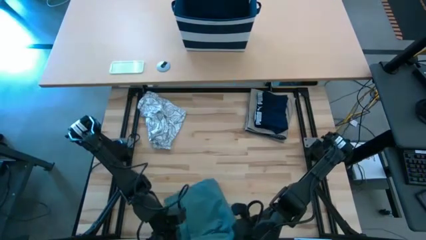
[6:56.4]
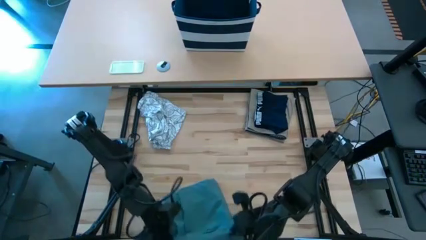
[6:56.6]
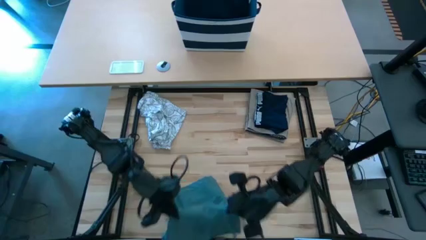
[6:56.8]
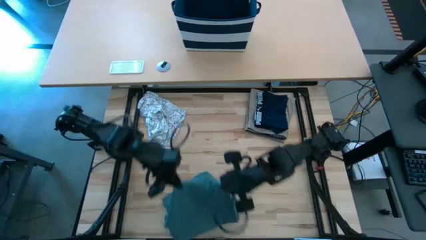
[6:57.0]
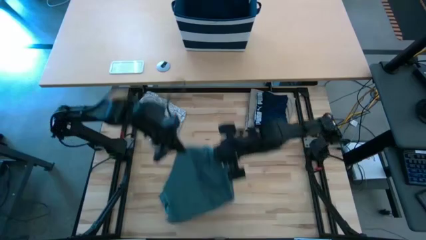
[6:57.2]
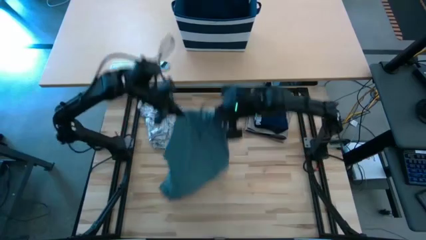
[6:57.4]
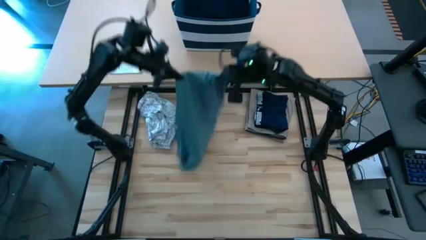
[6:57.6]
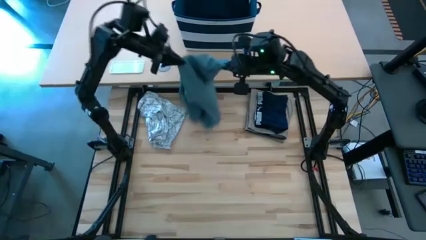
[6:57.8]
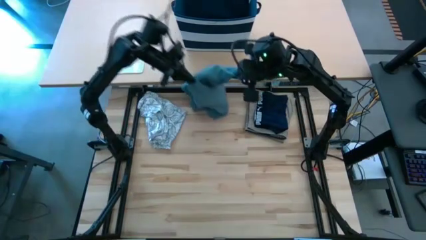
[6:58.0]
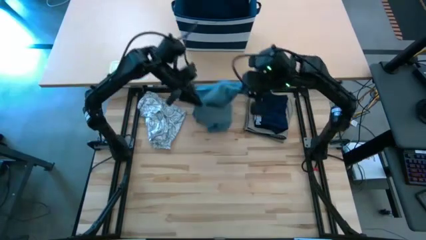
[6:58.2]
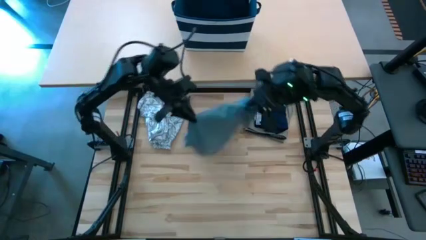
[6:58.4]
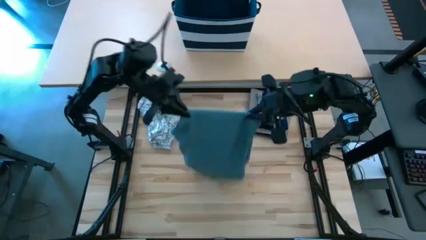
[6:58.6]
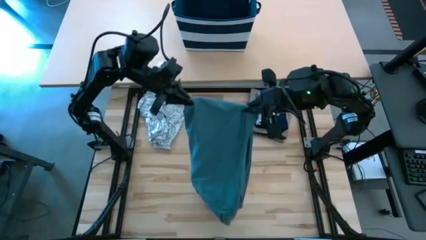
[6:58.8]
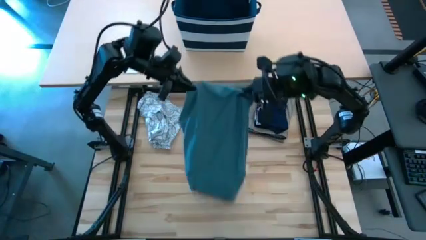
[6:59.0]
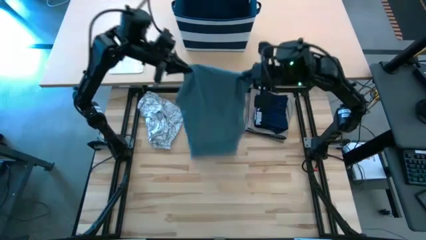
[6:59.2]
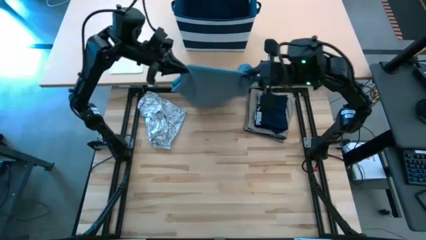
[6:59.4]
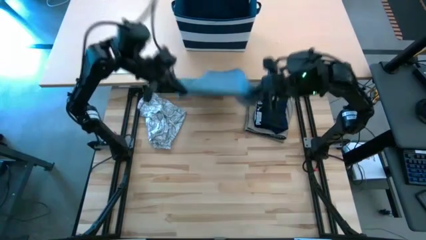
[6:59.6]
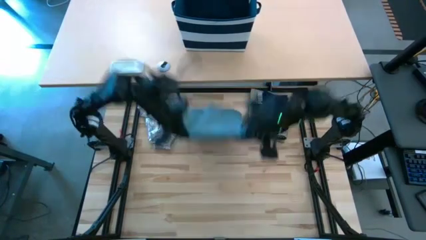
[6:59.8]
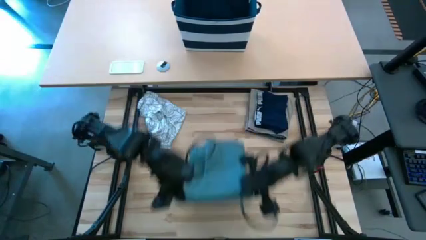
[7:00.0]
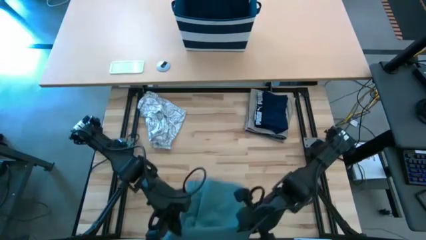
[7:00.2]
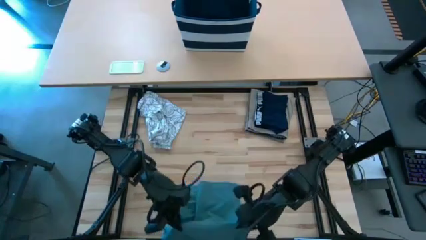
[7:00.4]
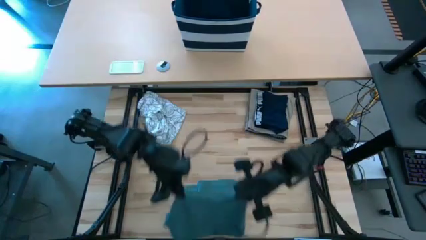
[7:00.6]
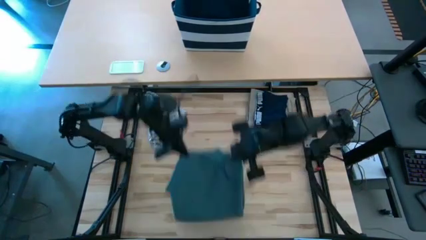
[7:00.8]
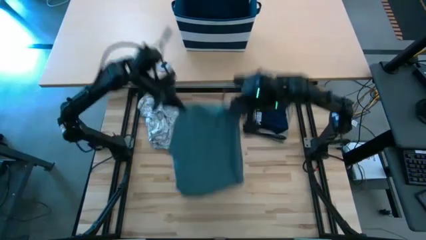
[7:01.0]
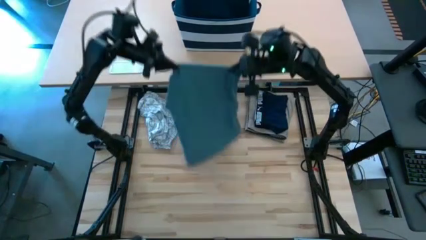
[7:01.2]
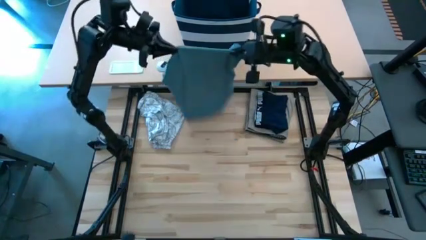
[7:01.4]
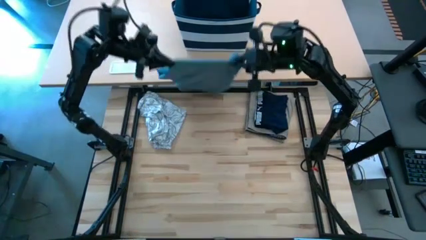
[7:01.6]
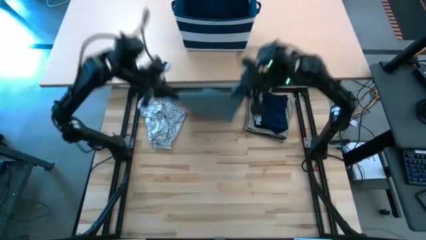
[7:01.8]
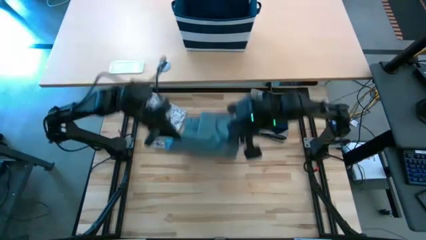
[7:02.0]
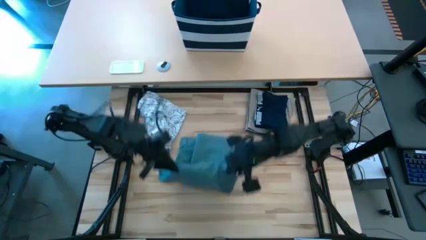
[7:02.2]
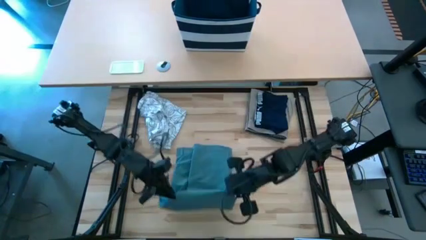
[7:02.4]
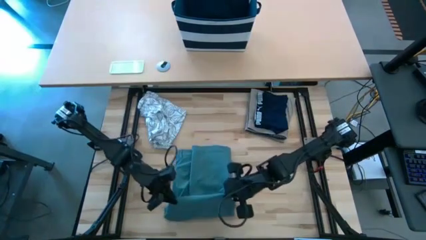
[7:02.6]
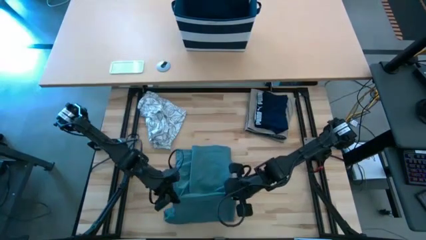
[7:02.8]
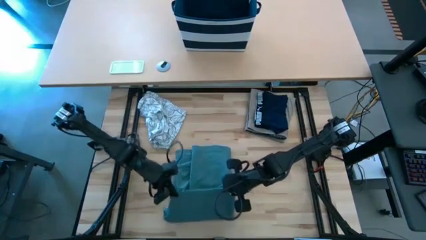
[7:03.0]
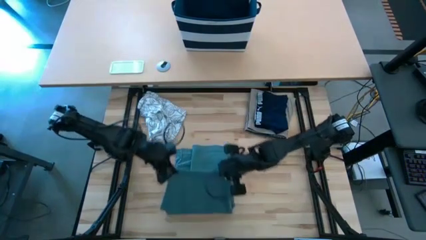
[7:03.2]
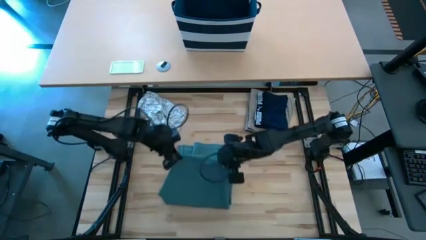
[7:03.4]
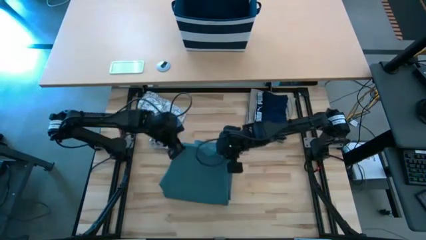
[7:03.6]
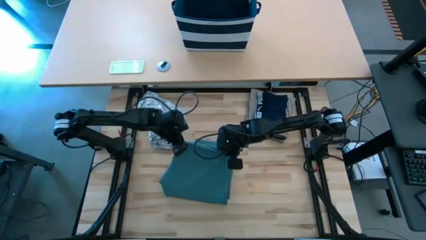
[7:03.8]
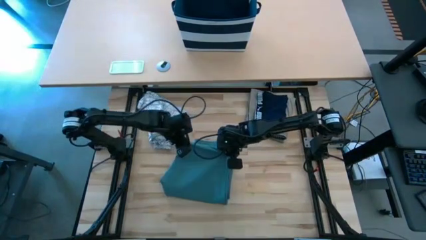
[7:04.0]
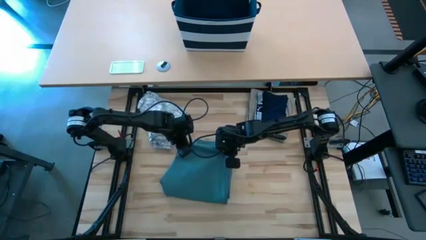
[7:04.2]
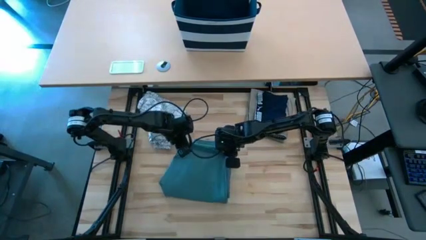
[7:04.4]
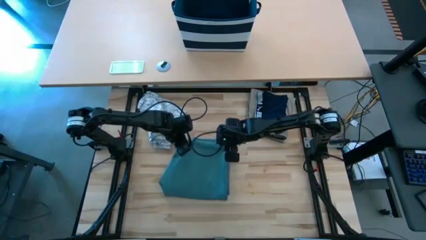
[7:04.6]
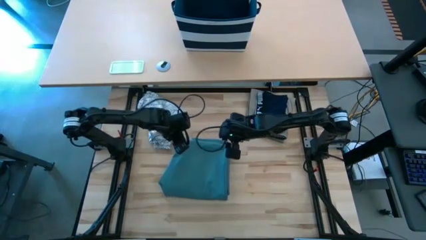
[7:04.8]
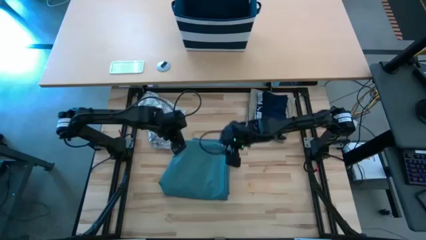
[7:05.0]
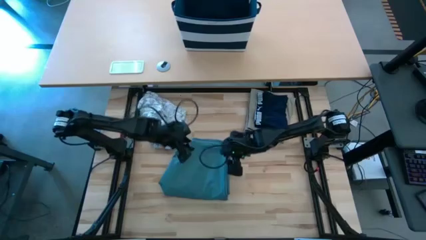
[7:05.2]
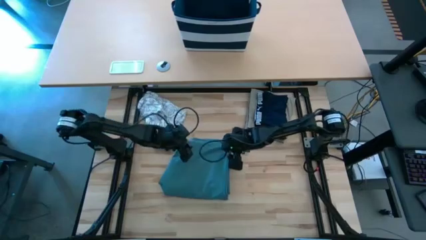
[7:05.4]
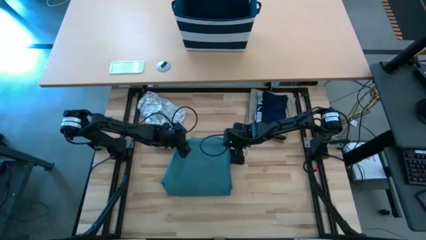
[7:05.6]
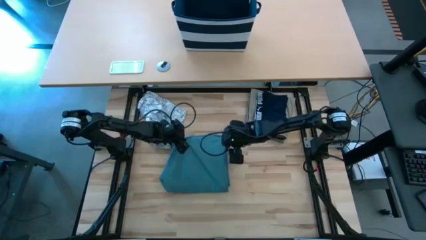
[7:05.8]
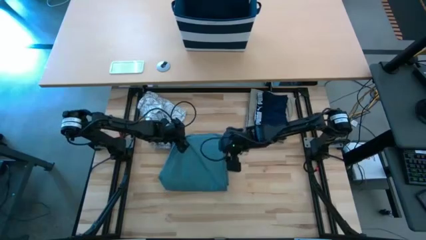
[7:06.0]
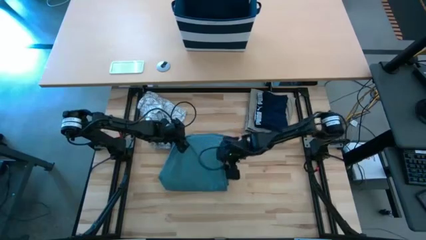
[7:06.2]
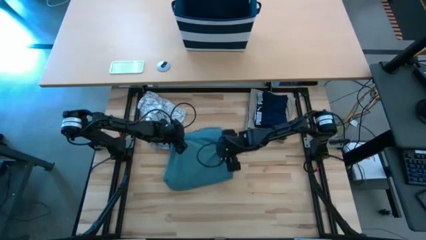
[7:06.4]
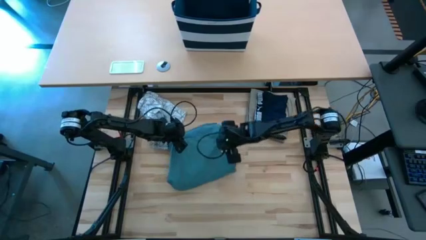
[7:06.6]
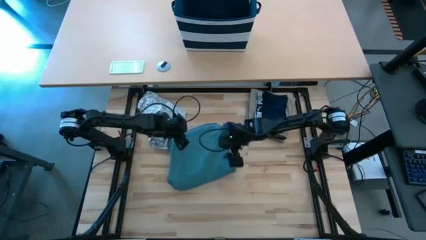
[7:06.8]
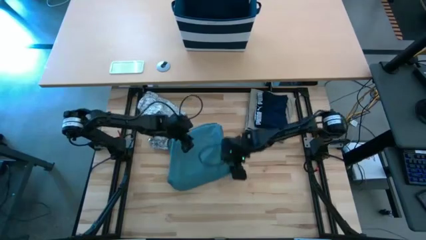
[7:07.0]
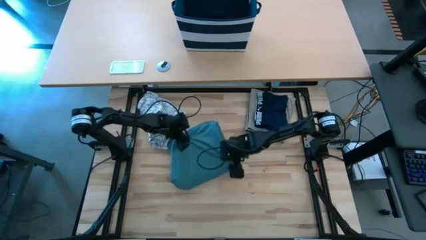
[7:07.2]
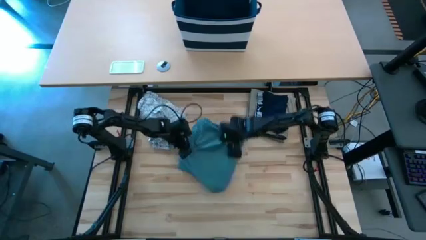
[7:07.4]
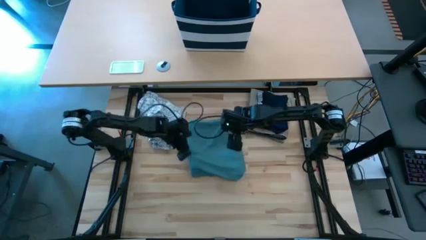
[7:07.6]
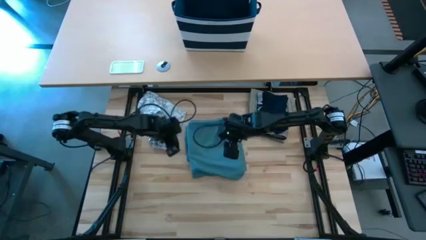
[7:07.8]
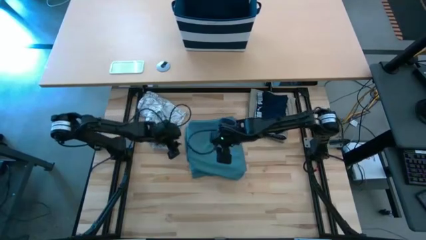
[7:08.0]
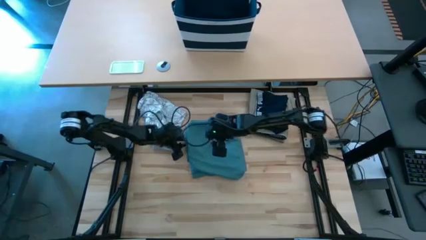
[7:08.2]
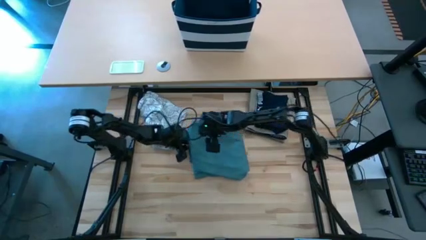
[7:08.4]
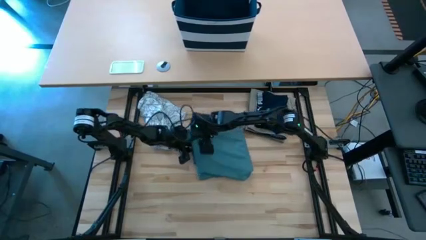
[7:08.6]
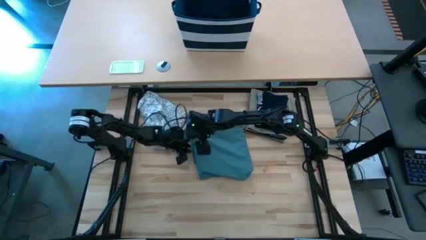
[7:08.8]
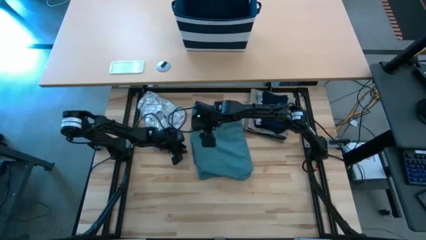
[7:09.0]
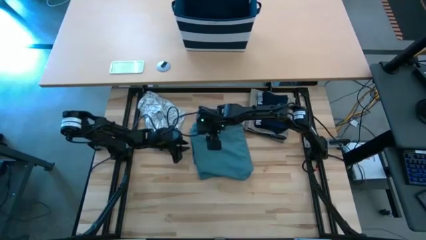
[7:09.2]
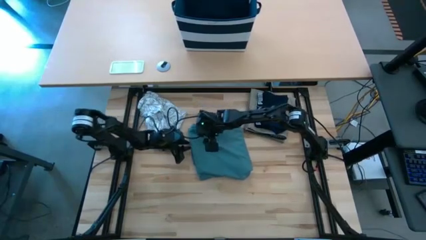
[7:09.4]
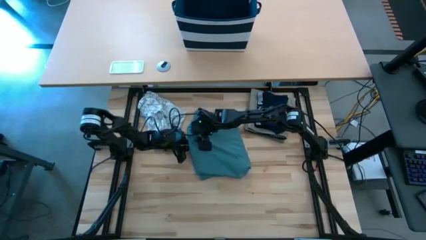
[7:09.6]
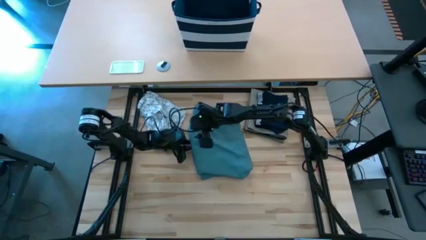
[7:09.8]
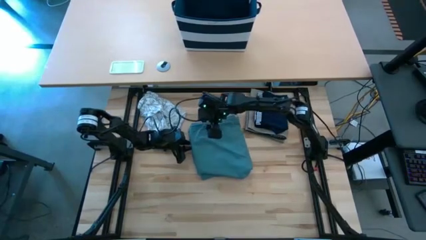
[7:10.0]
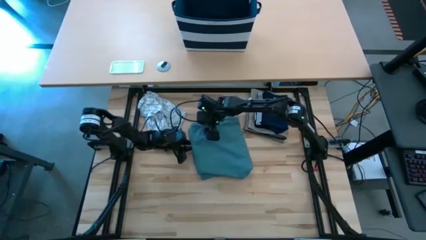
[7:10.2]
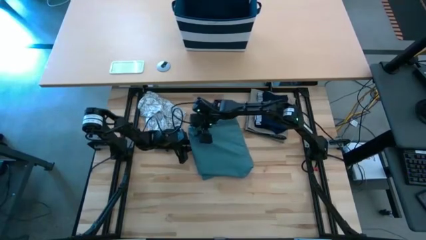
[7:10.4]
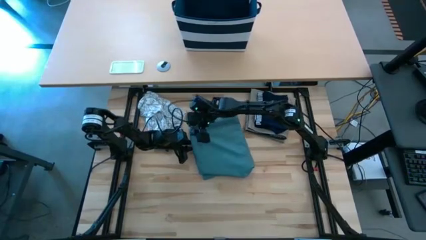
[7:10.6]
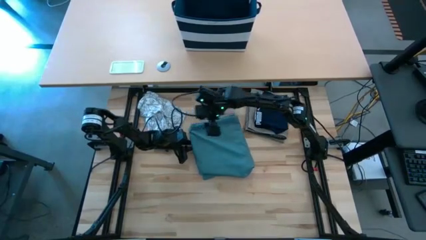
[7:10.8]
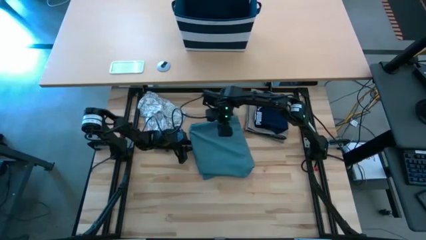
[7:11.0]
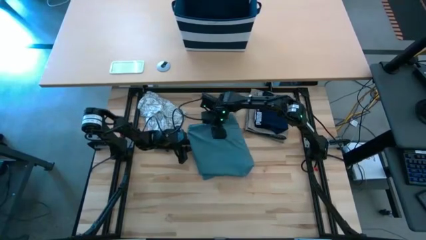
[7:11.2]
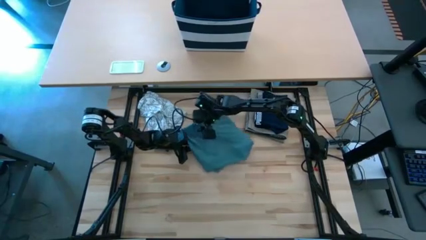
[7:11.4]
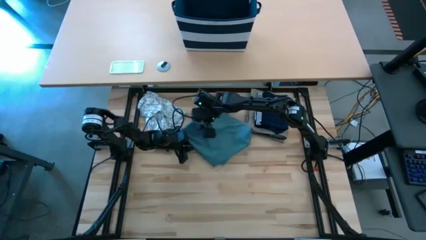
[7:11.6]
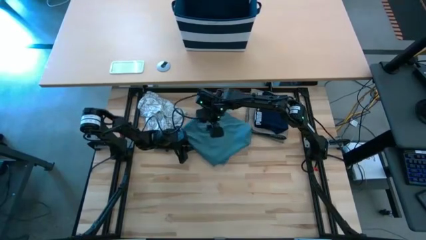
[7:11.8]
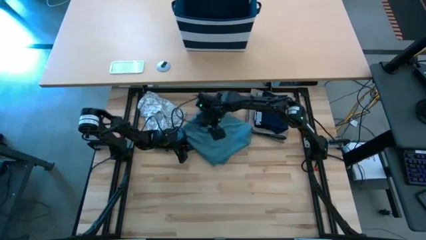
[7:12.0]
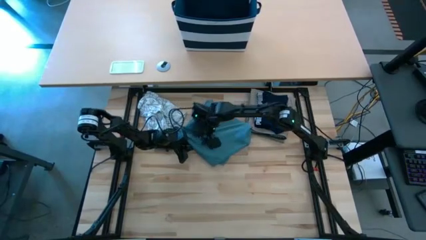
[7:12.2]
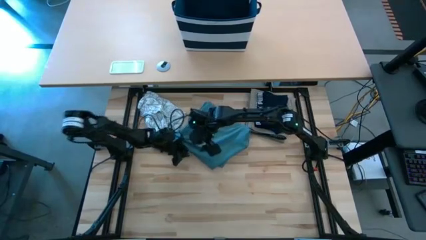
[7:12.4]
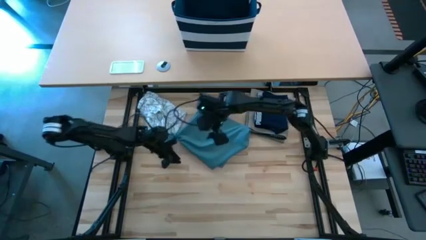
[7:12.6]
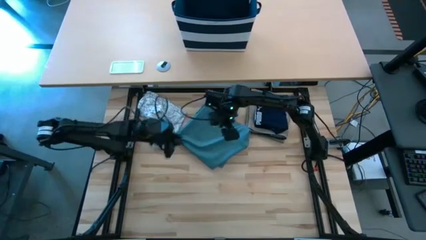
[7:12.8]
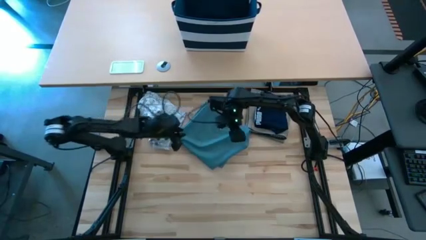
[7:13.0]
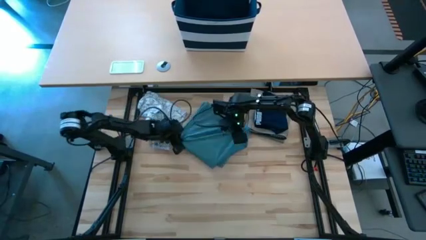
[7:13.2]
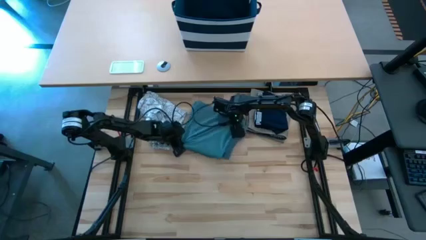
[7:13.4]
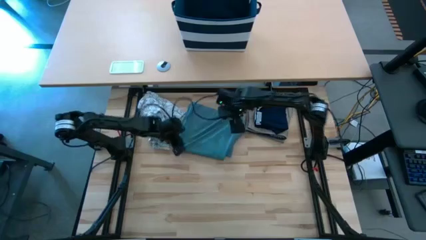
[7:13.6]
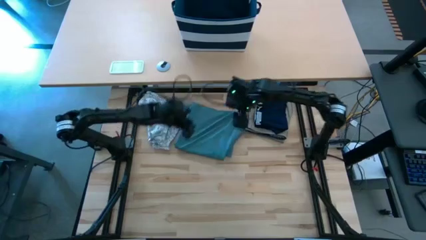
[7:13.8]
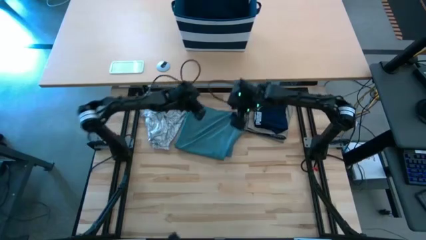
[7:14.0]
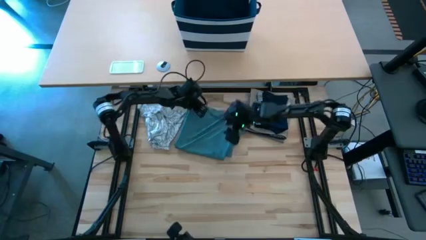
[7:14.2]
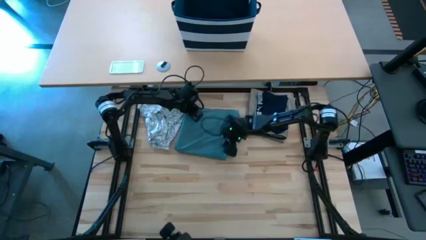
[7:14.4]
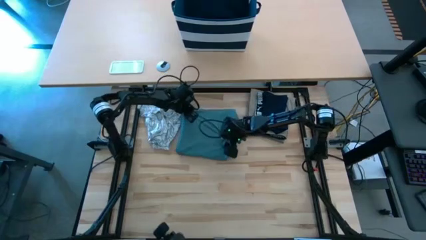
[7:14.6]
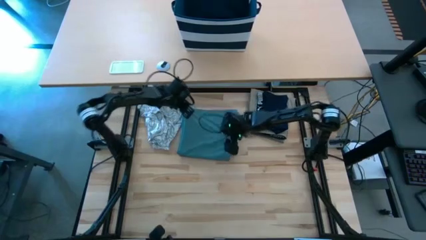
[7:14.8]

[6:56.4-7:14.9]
Task: Fold Laundry from Bin
Fold the blue pants
